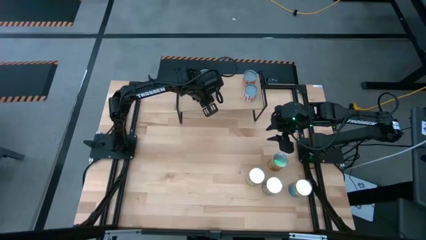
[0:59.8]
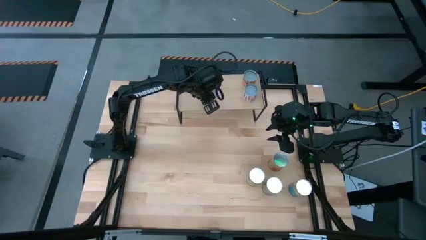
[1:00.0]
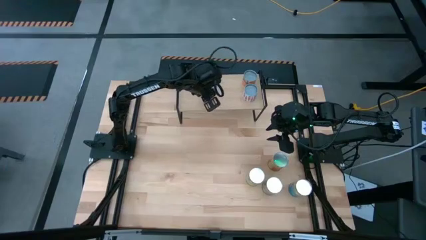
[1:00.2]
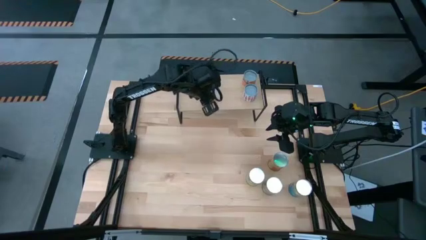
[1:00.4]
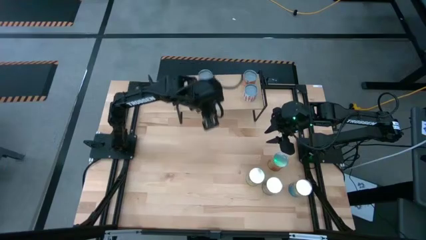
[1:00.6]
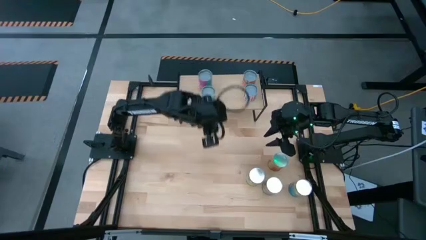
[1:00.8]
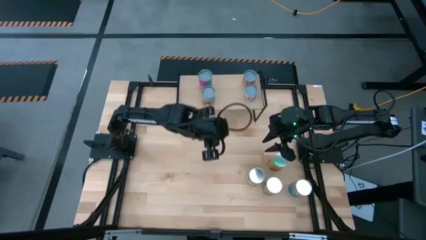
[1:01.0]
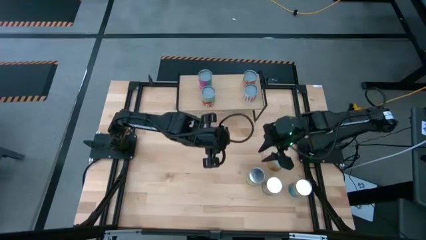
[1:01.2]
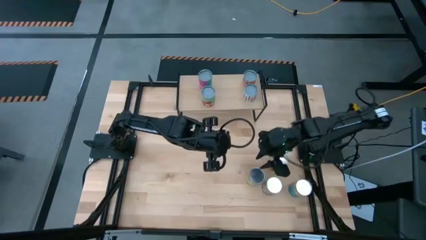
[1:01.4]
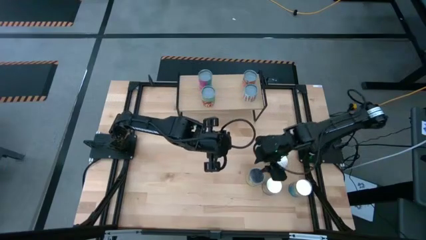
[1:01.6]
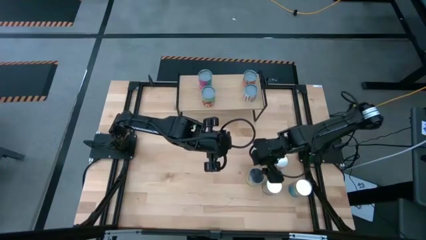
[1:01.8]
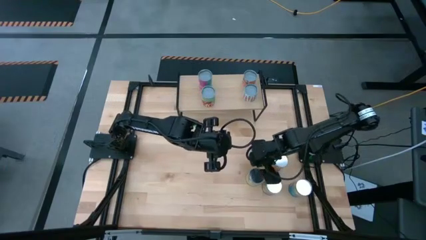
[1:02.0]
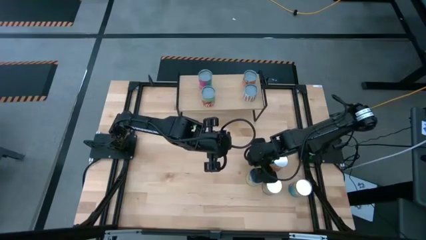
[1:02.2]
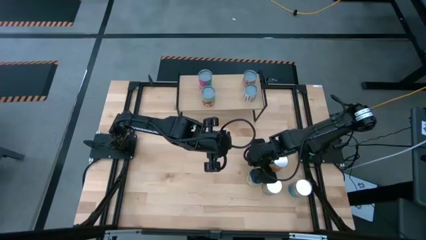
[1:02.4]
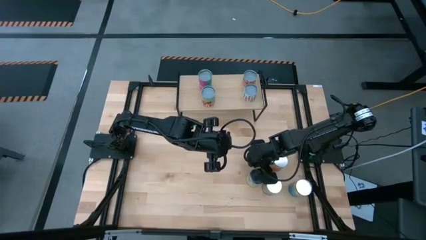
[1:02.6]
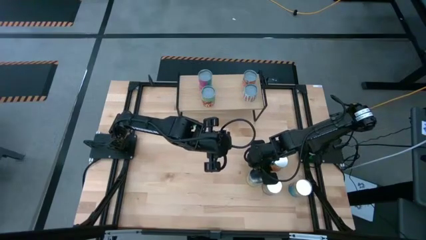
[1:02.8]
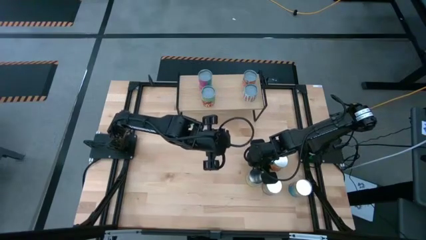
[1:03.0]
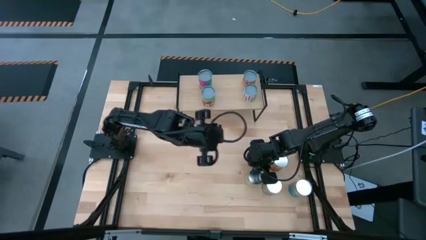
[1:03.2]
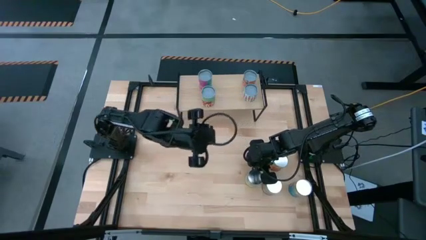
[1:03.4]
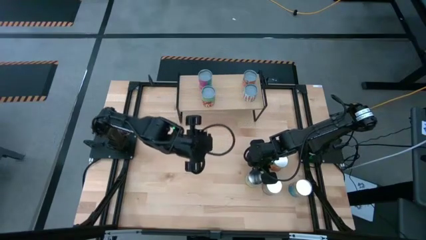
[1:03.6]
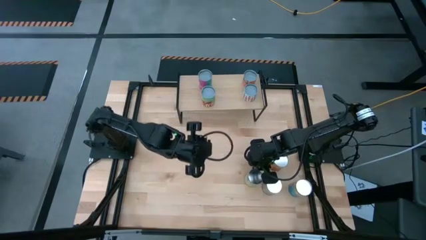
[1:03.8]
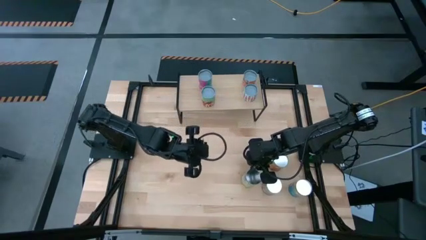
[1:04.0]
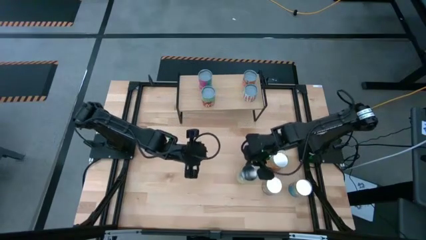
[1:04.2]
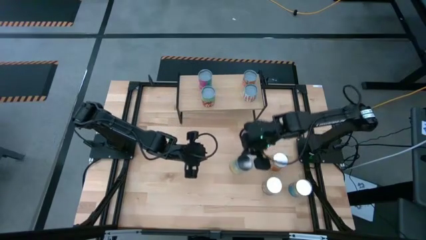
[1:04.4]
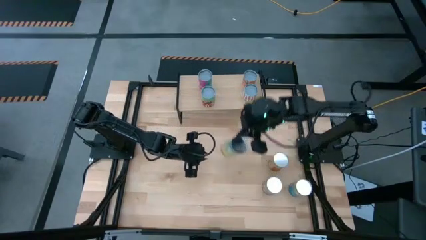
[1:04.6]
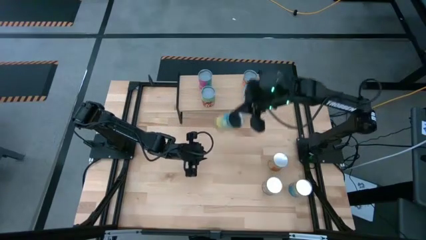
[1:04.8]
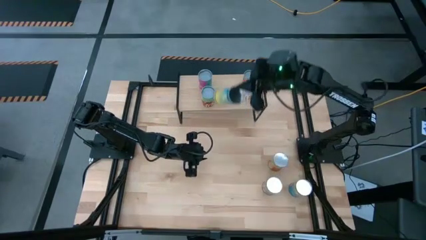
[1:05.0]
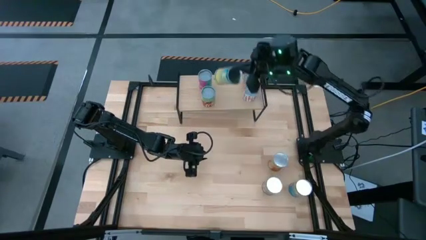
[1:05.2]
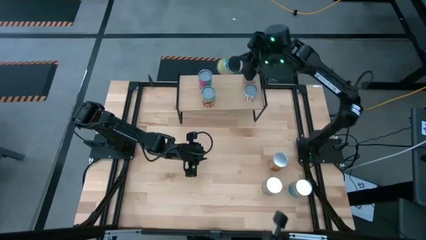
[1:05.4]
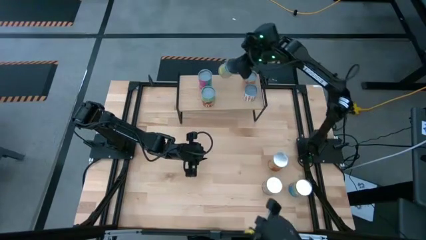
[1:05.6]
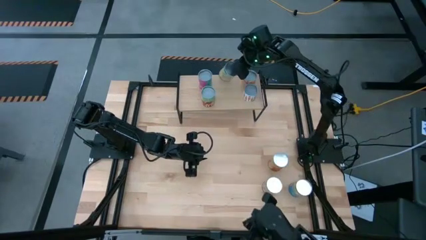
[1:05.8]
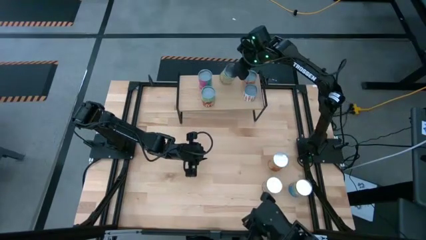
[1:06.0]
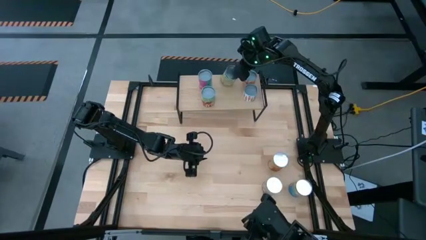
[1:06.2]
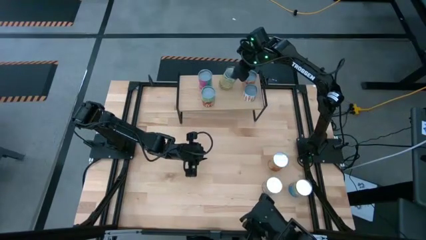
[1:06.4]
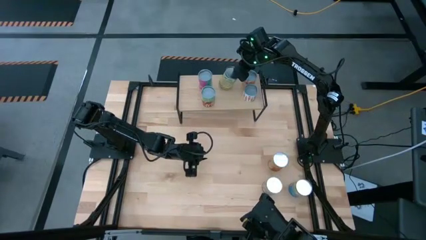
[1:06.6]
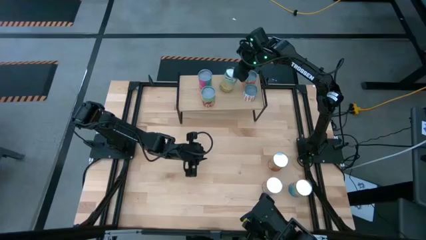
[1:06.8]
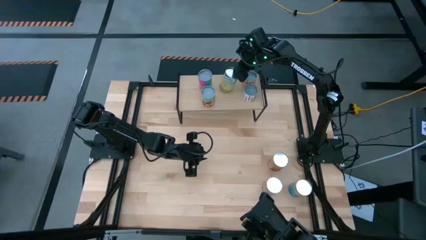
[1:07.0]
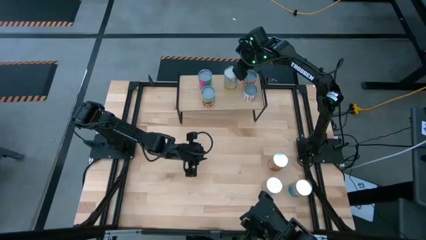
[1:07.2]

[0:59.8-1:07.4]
Task: Pick and place cans onto a shelf
Put the canned carrots on the shelf

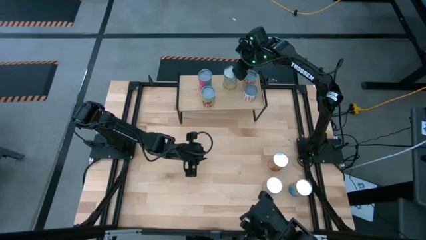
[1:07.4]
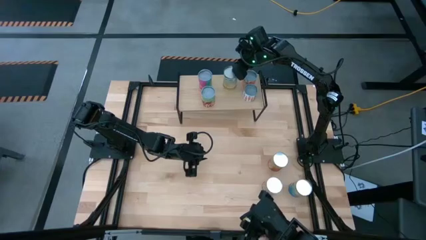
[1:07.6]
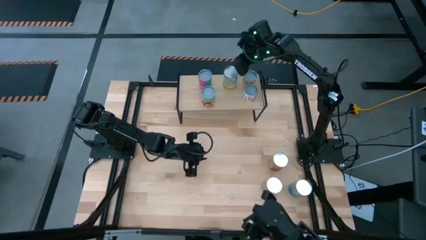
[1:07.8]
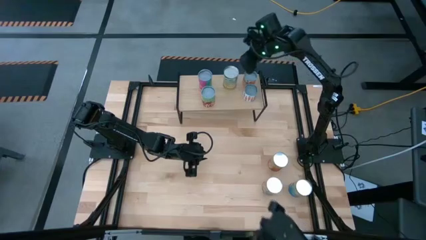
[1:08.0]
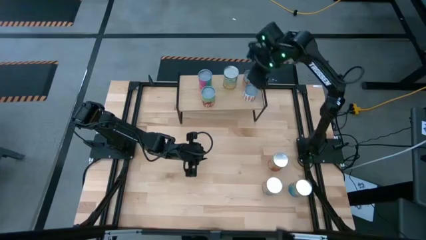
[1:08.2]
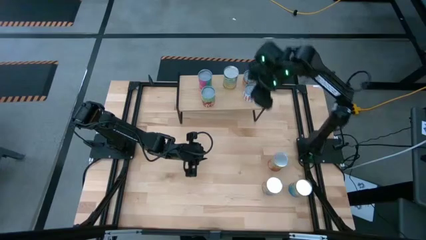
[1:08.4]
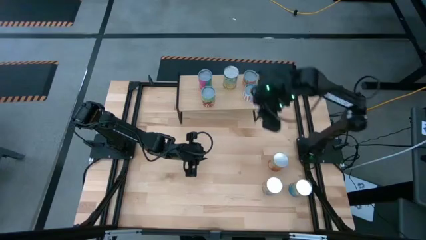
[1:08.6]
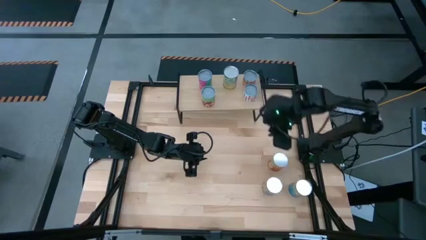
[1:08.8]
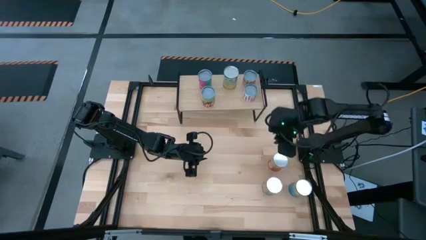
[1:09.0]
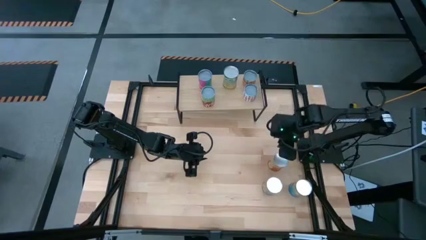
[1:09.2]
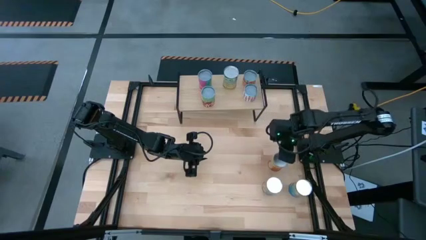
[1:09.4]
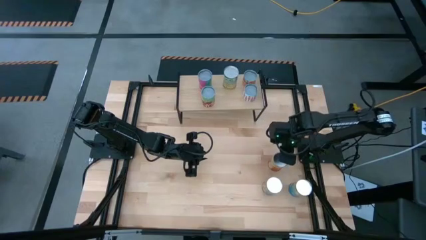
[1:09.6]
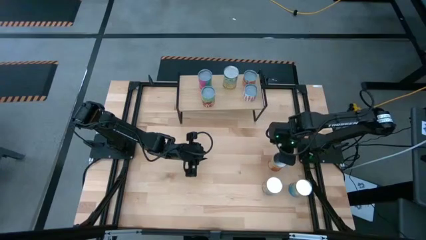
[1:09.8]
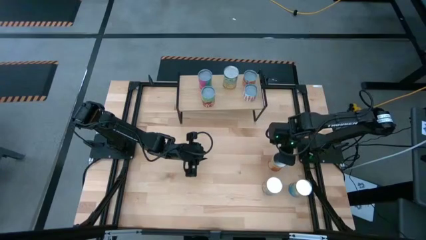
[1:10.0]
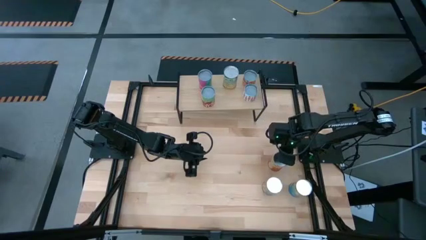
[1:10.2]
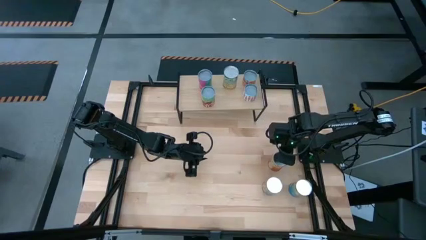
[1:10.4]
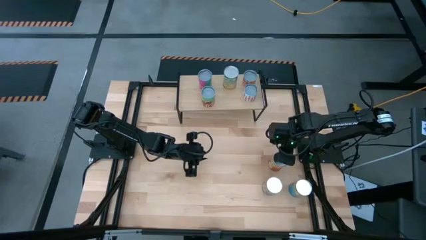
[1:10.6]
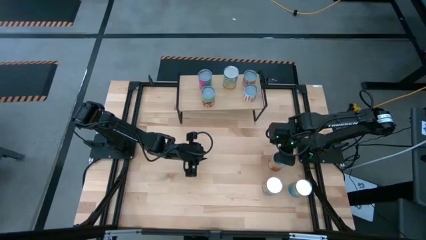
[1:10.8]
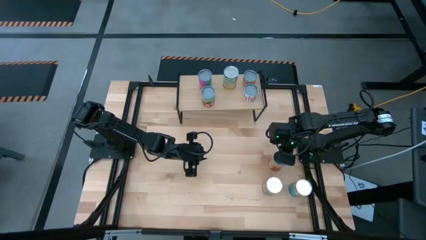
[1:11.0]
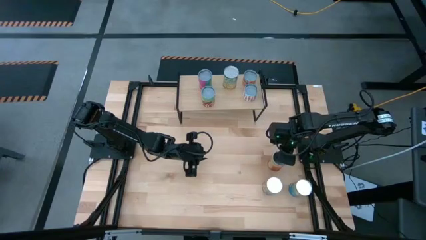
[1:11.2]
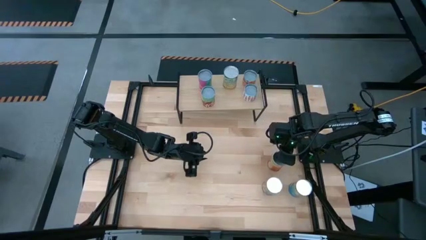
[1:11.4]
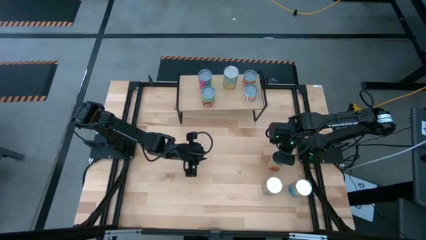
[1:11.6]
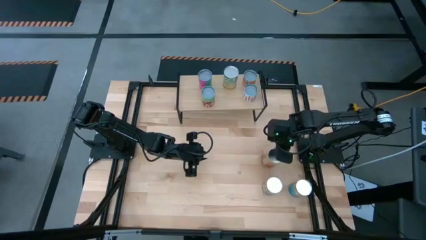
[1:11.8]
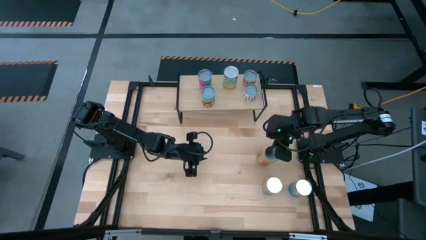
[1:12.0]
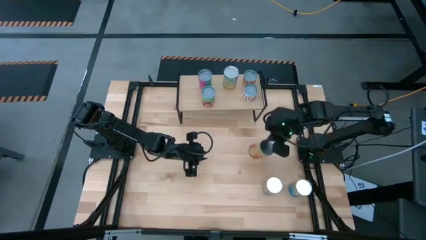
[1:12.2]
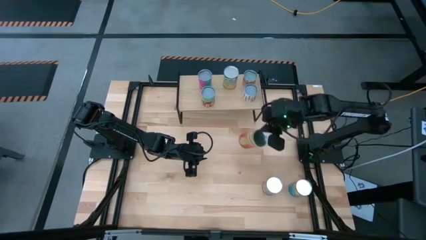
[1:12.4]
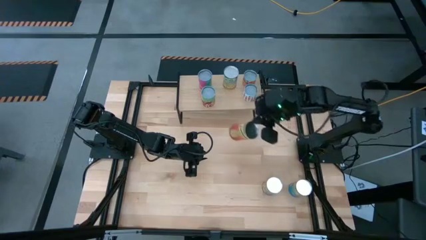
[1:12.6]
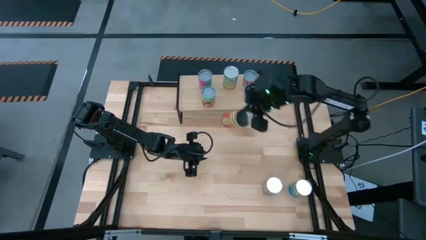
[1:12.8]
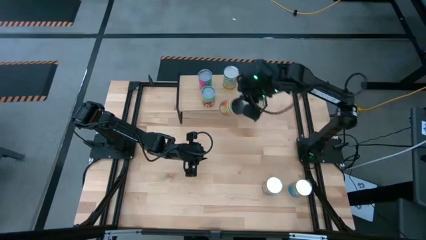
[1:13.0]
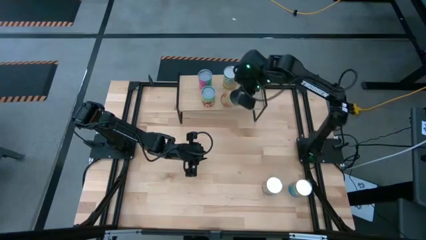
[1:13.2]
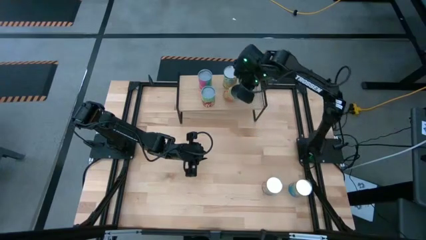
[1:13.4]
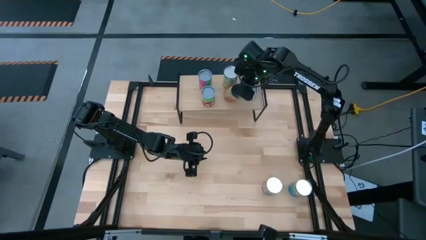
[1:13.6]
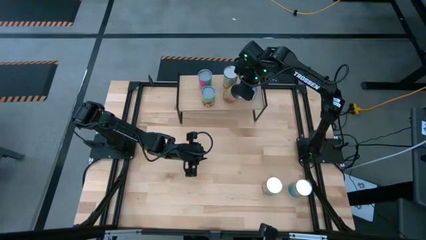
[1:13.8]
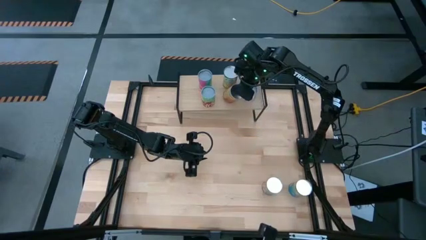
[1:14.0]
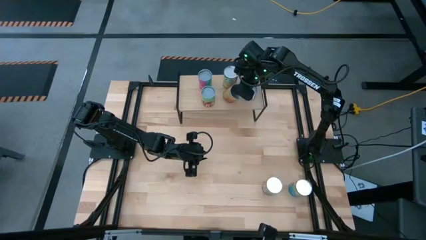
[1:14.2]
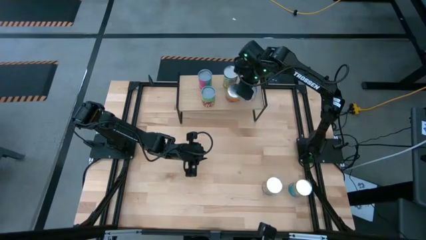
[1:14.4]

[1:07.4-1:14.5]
Put the canned pineapples on the shelf
